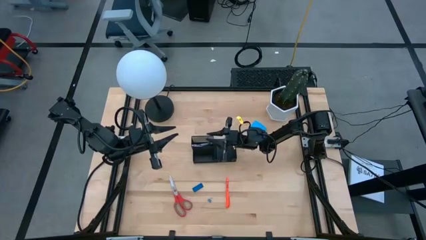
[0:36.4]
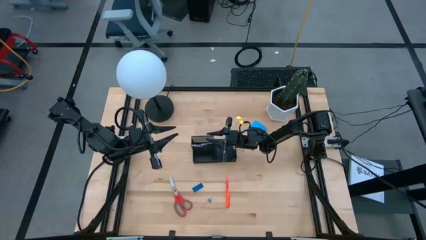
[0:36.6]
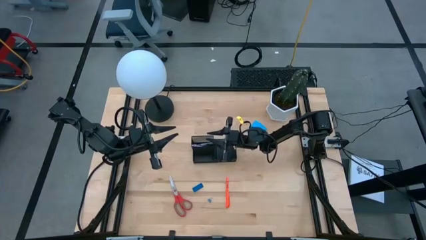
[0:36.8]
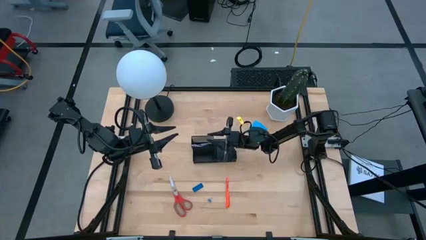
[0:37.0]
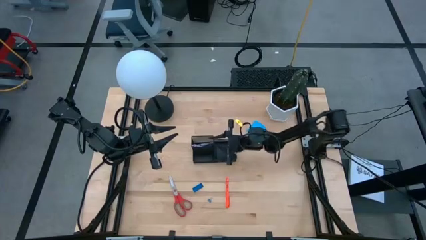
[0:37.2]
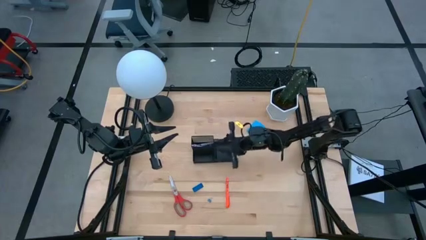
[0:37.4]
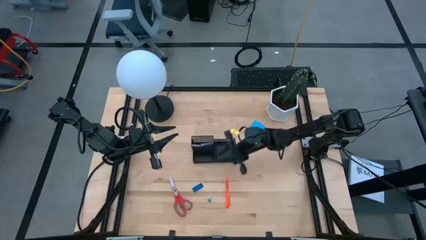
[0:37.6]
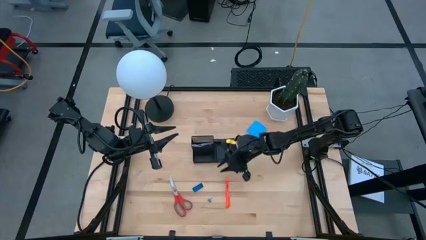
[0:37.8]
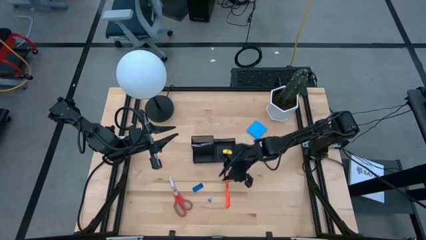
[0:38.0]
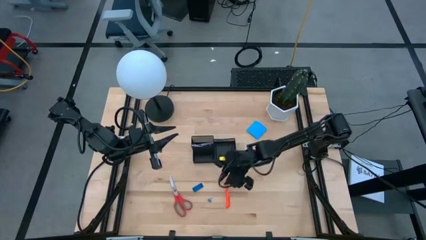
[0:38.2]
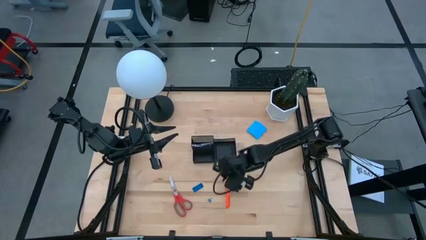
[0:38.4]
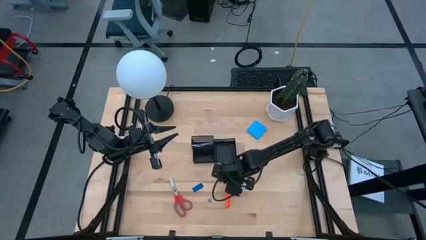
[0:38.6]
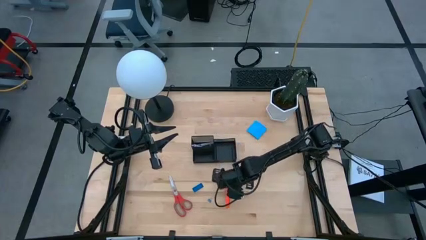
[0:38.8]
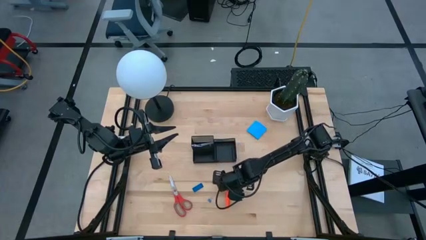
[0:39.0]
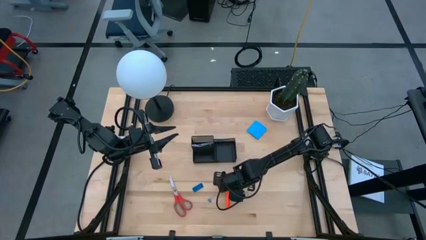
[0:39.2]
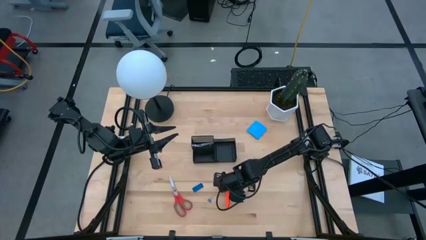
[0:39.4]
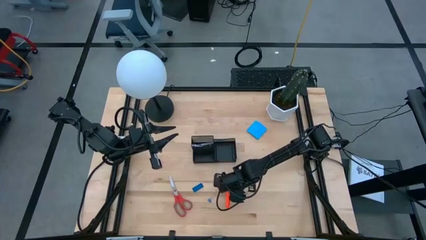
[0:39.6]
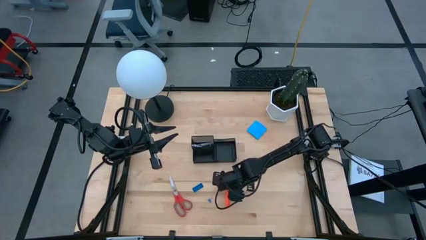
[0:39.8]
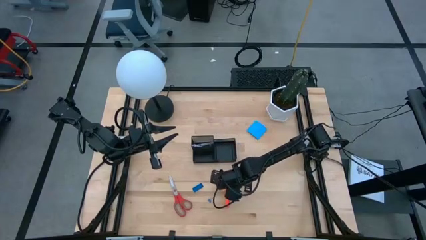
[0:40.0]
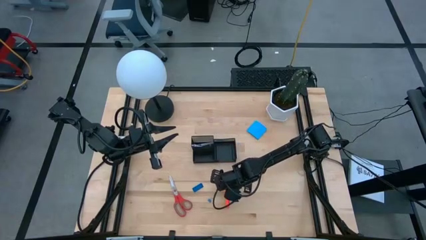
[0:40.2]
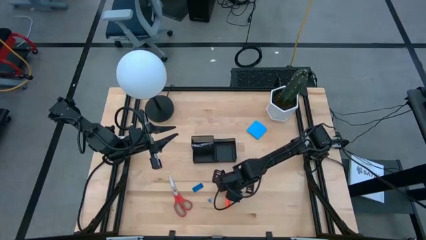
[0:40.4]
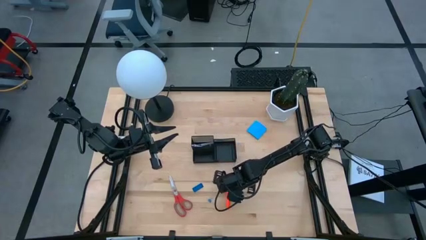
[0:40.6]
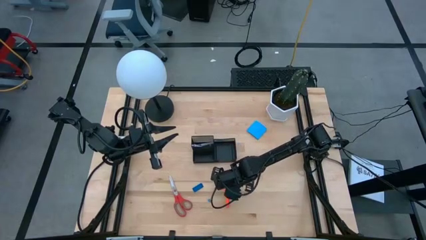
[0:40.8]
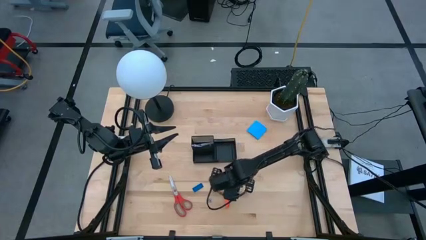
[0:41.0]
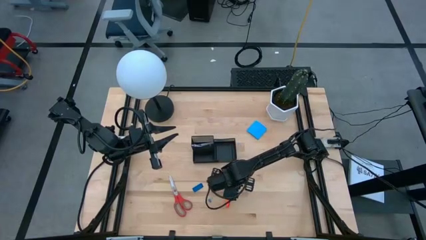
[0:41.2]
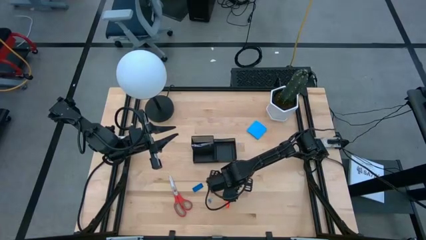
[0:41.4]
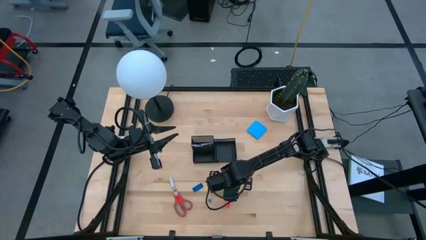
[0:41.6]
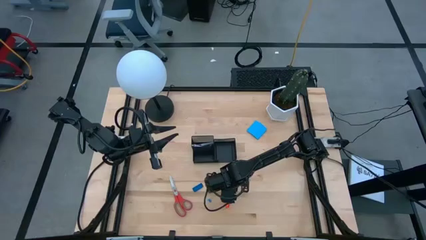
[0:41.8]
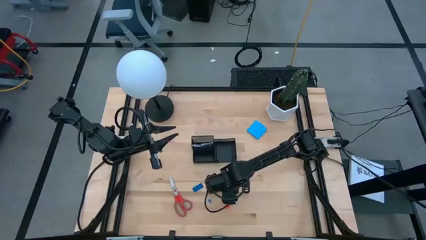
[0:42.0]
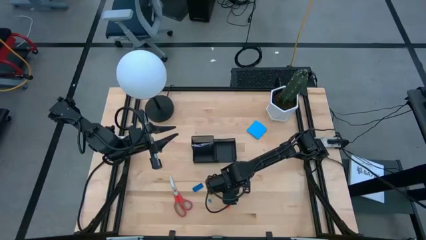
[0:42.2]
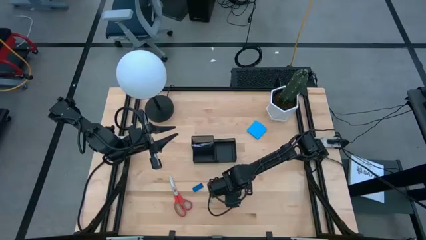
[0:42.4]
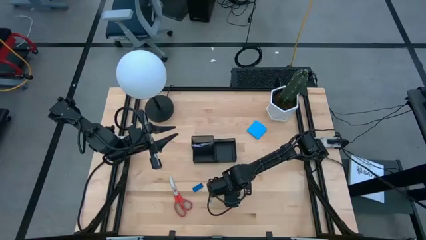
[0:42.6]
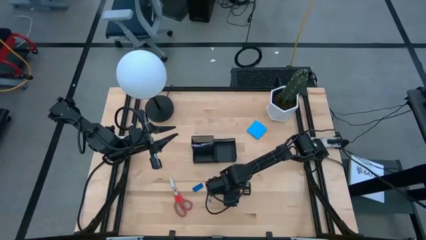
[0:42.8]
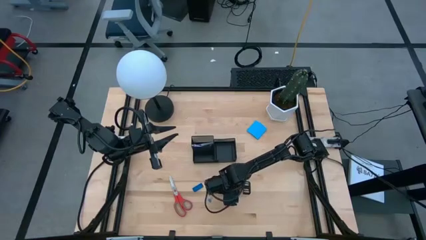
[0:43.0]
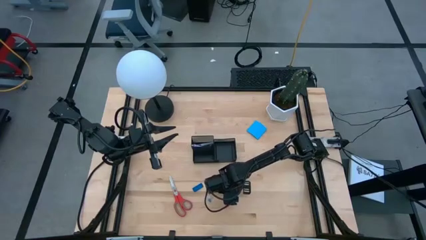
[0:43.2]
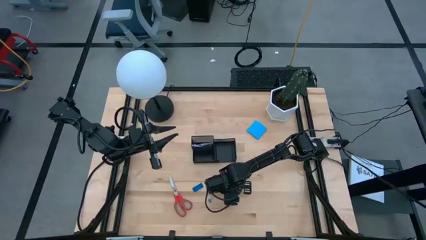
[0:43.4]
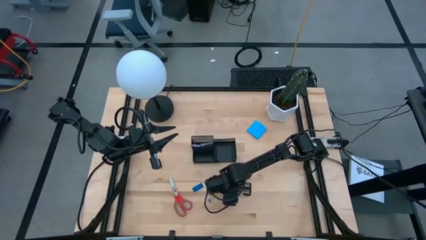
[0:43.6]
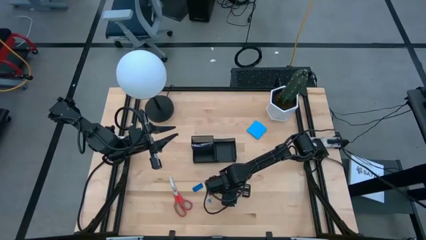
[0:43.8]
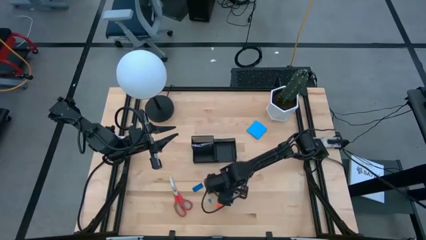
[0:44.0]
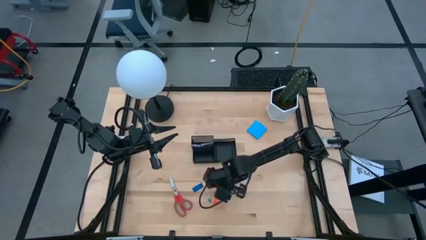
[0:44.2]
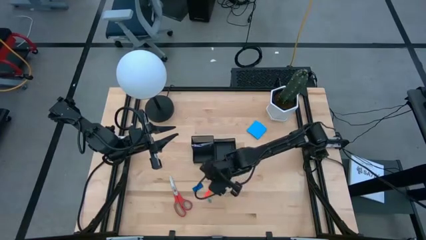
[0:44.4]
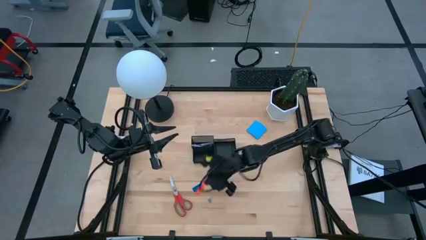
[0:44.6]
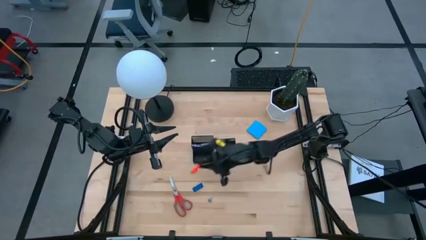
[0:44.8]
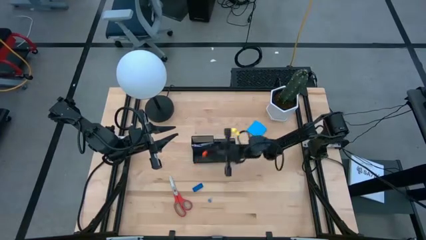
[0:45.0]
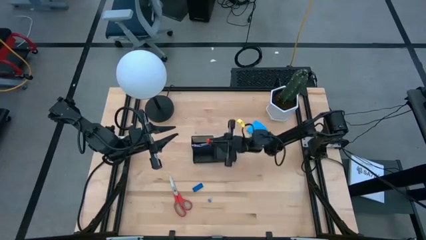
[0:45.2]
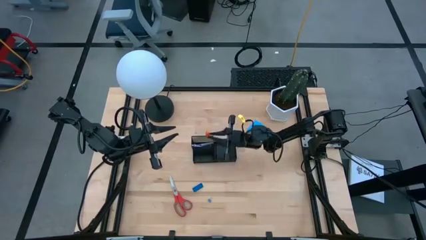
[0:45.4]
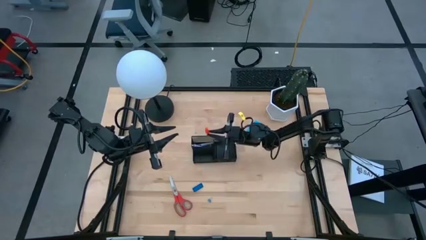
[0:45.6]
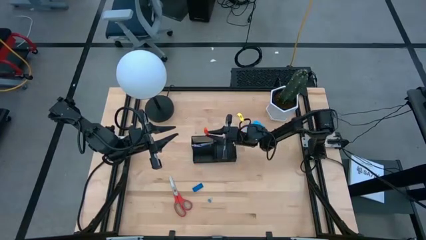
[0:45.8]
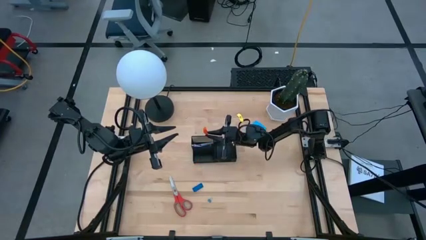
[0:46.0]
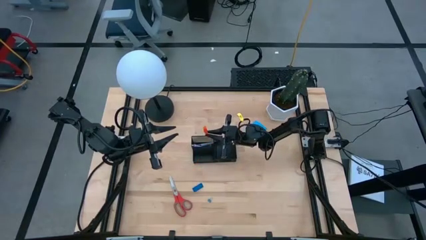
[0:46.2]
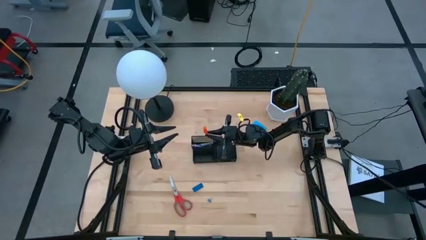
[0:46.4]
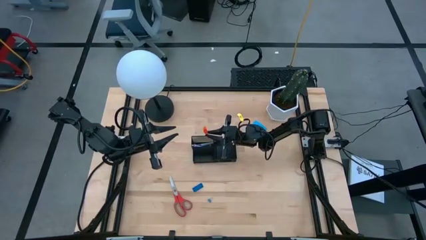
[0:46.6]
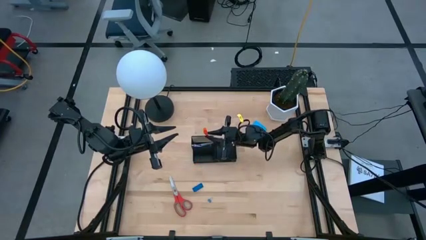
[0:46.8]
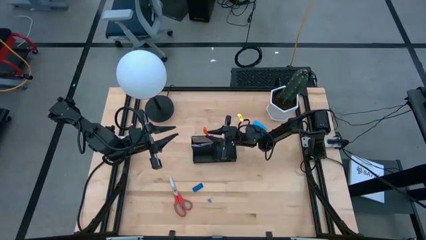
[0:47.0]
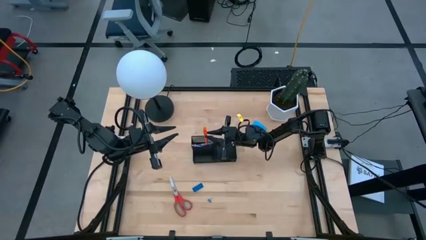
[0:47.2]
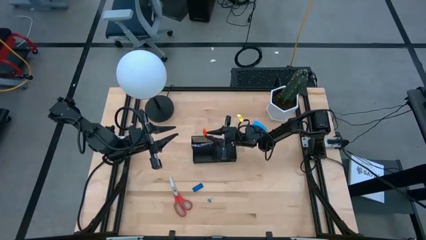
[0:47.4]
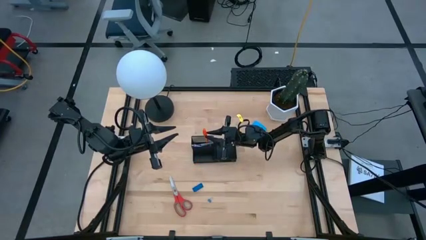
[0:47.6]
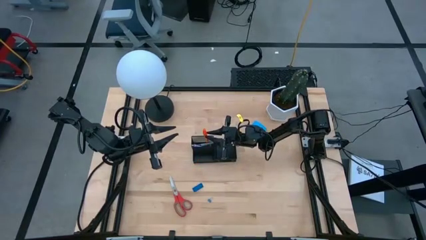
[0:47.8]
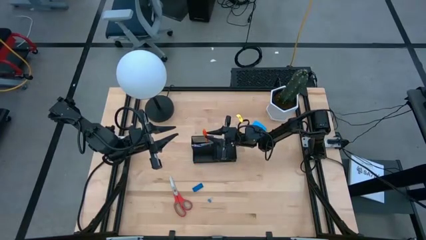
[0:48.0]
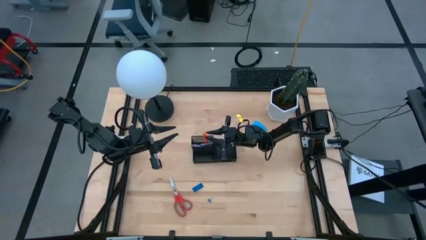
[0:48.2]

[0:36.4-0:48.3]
Task: Pick and place office supplies into organizer
Put the orange pen into the black desk organizer
